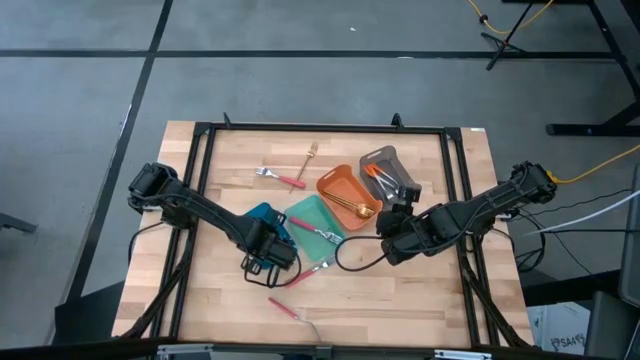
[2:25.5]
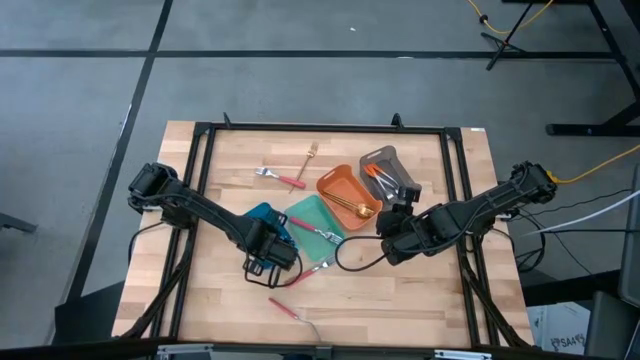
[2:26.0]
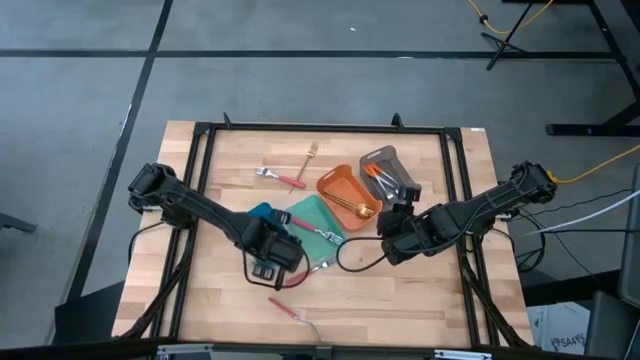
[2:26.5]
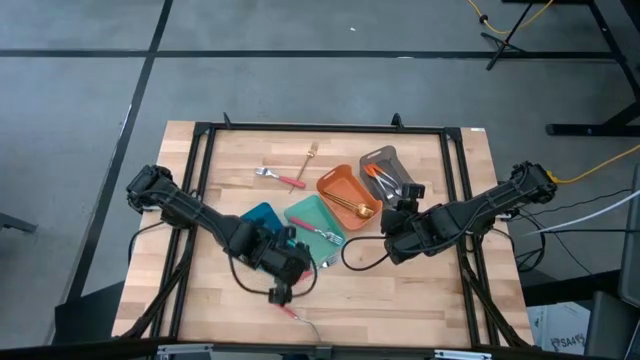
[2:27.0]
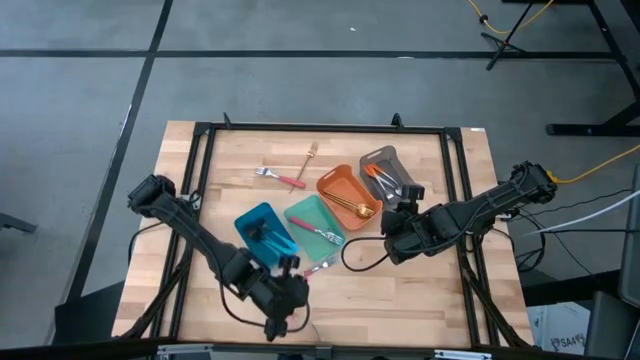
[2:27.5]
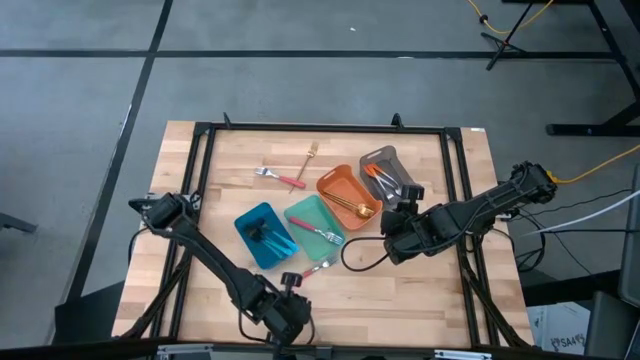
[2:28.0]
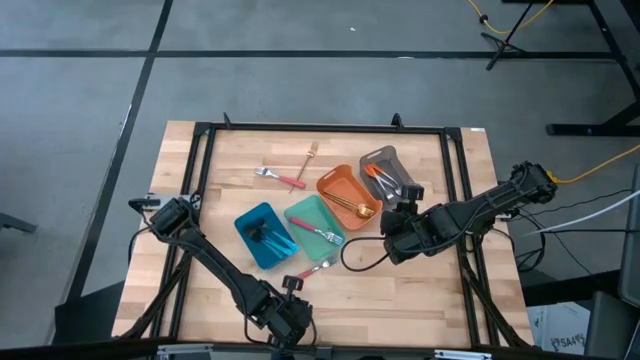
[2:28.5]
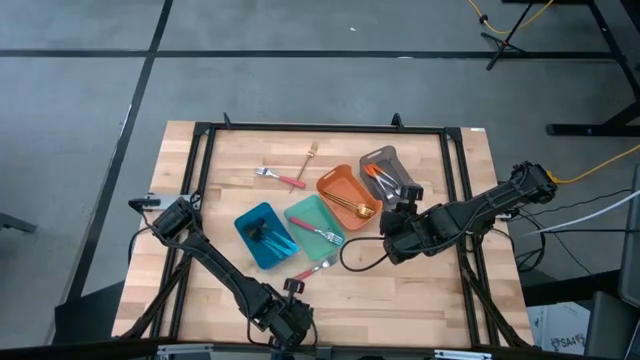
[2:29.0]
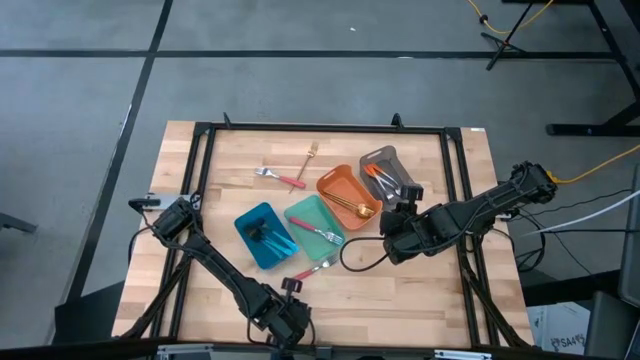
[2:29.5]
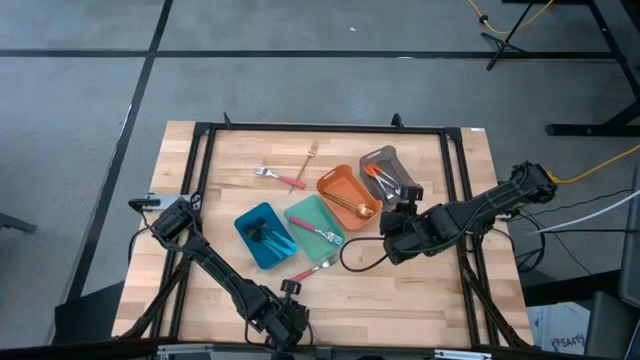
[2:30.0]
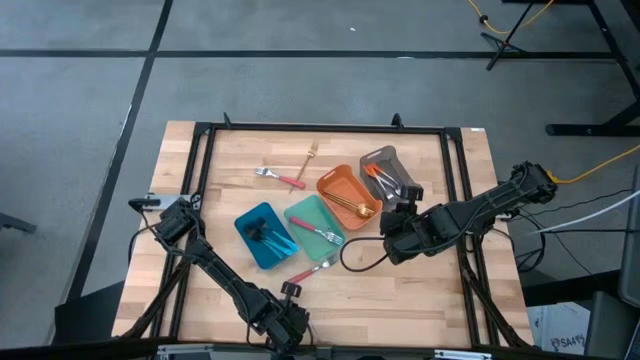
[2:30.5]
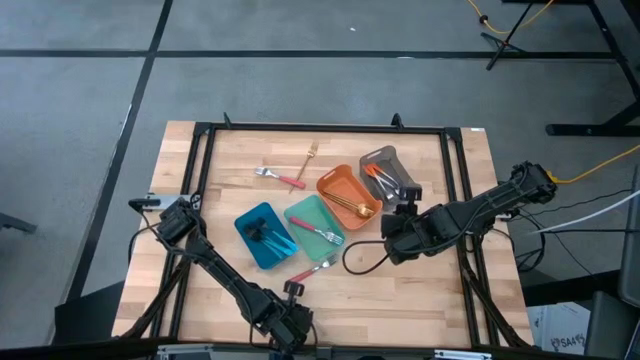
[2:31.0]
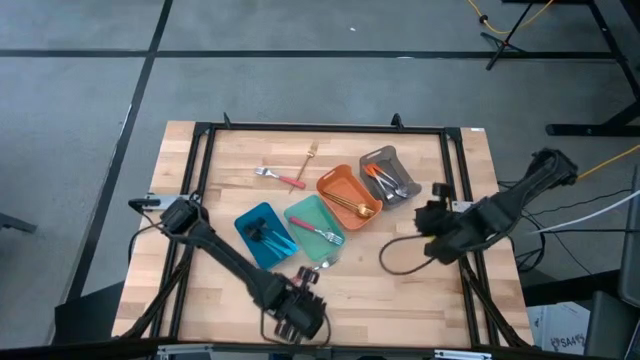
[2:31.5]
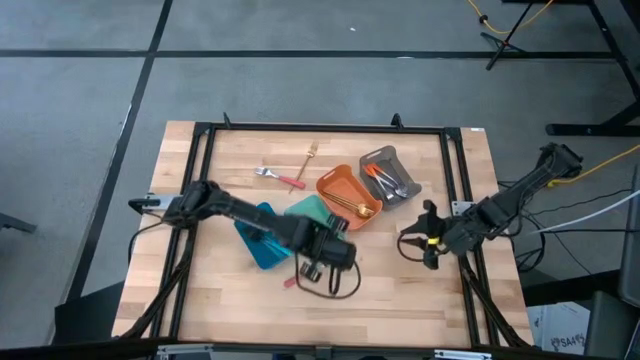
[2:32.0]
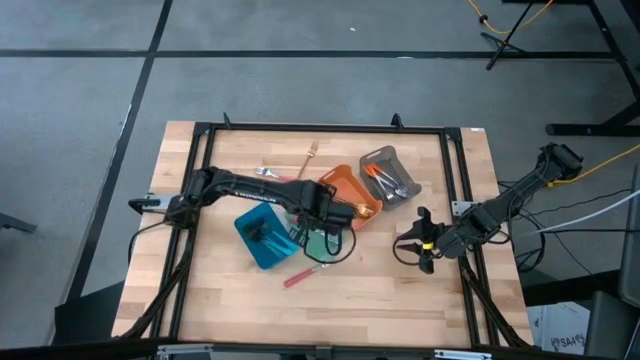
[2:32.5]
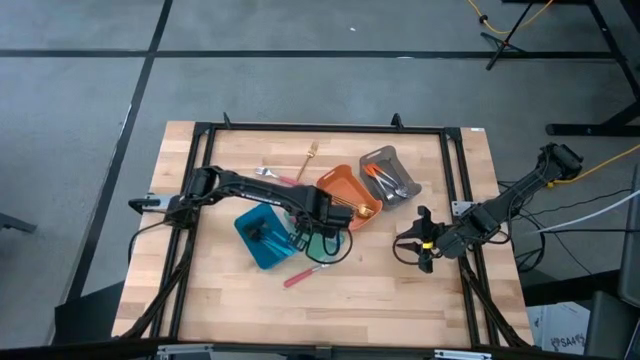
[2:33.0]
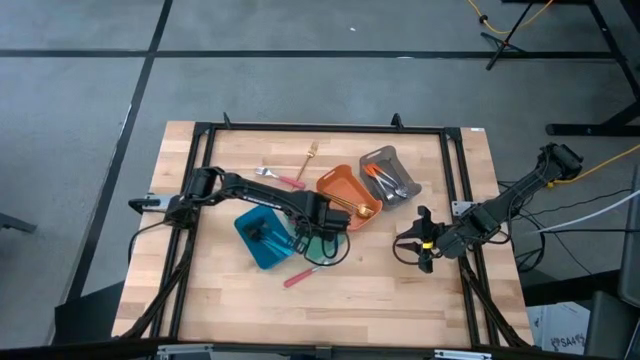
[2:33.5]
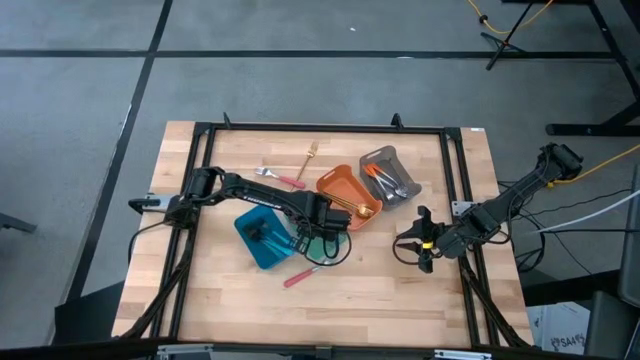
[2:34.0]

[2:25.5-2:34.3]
Task: Sort silverware by color (type)
Put the pink fork into the green bin

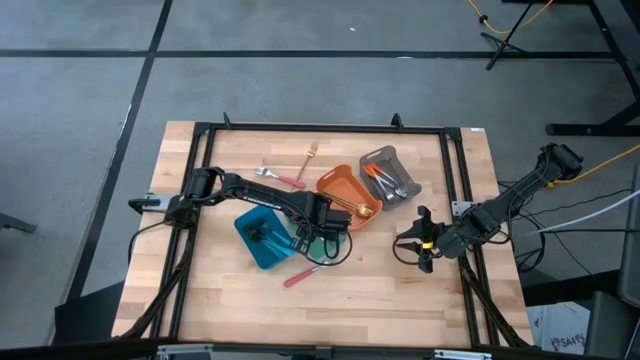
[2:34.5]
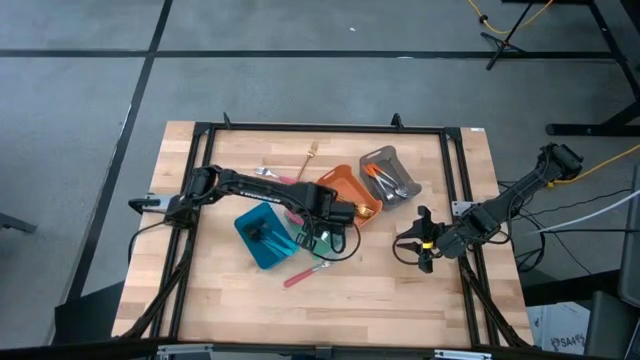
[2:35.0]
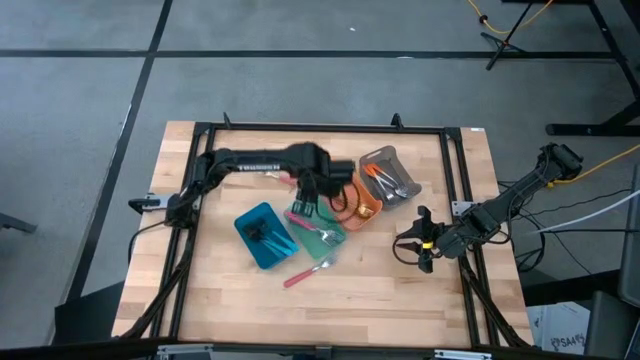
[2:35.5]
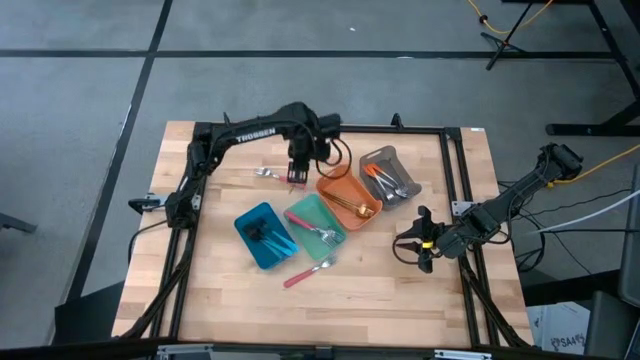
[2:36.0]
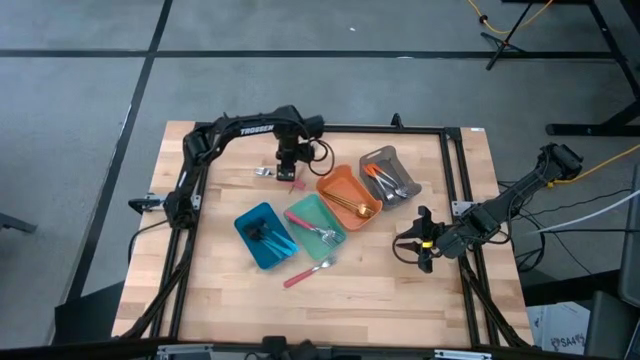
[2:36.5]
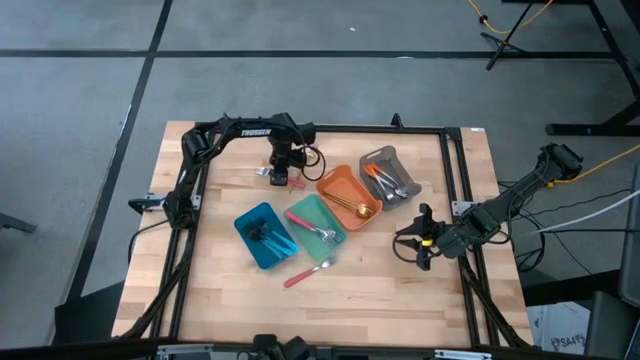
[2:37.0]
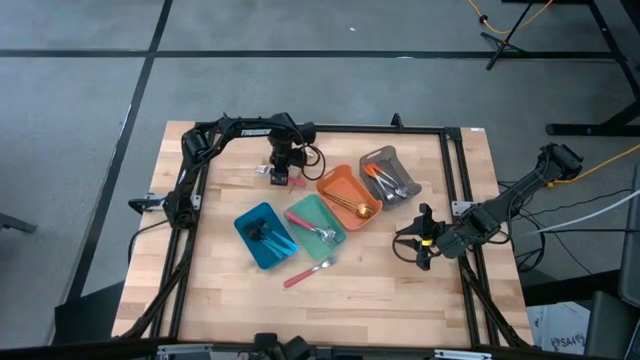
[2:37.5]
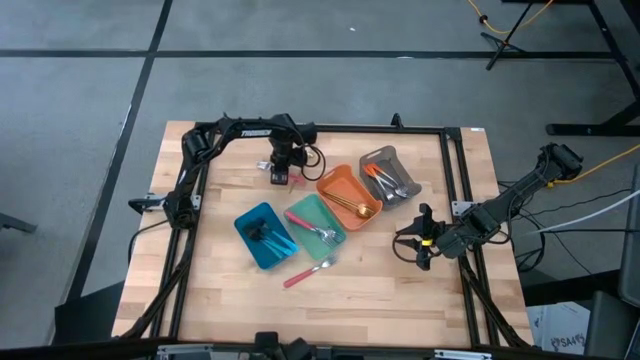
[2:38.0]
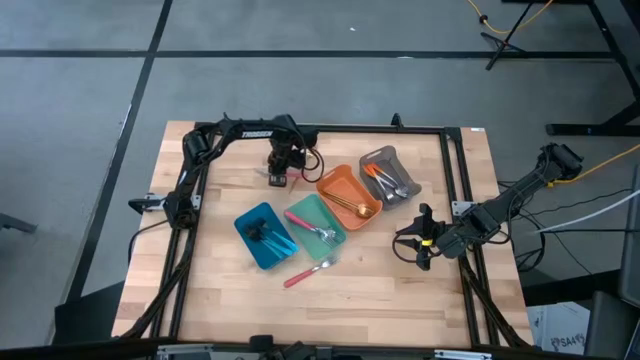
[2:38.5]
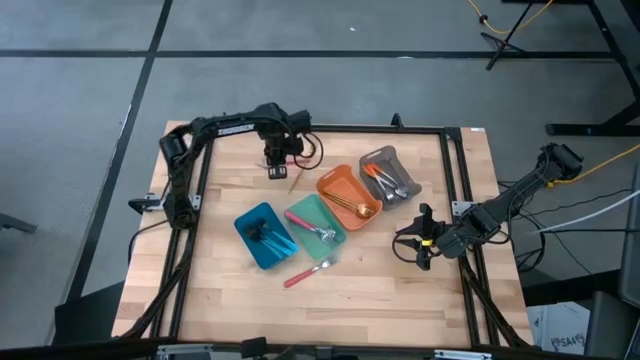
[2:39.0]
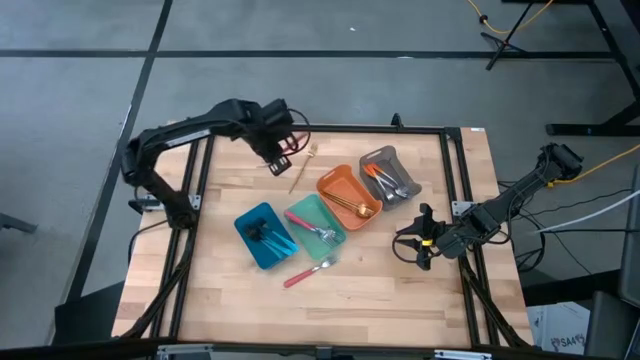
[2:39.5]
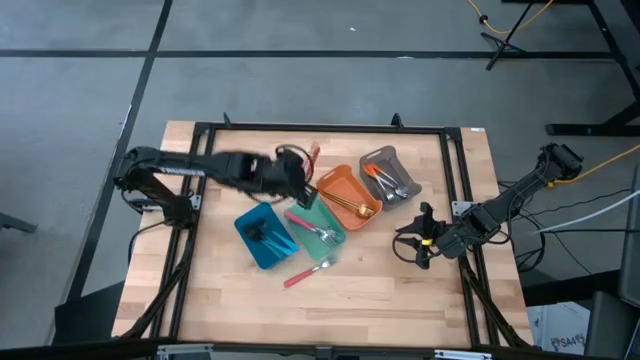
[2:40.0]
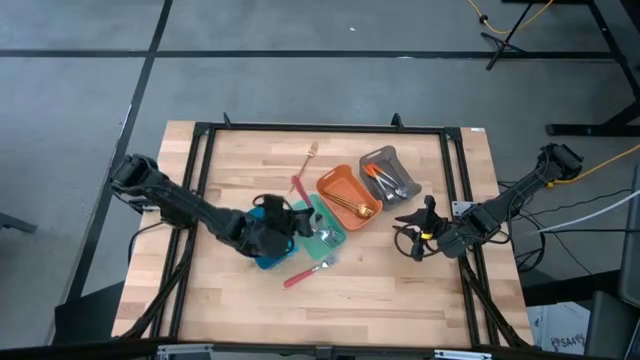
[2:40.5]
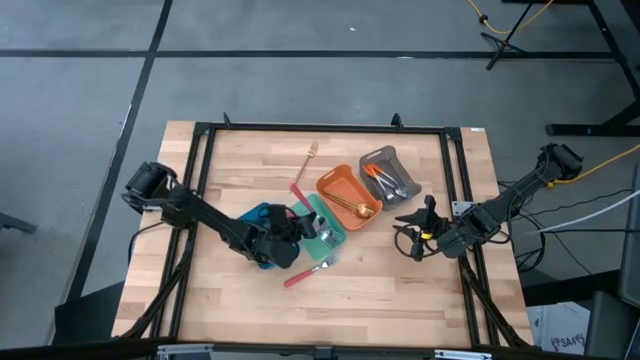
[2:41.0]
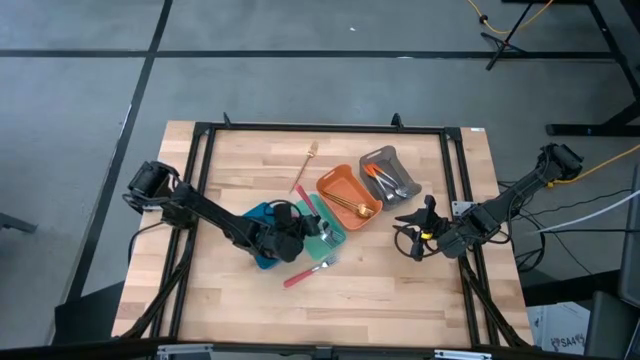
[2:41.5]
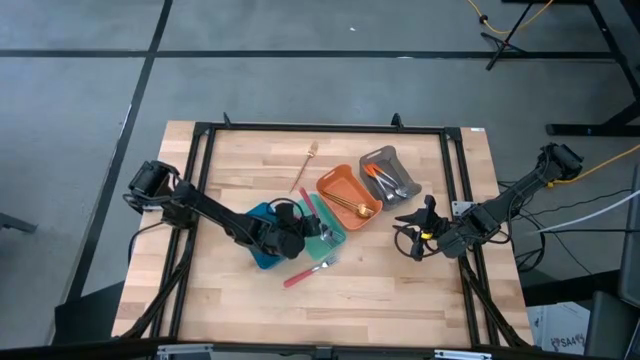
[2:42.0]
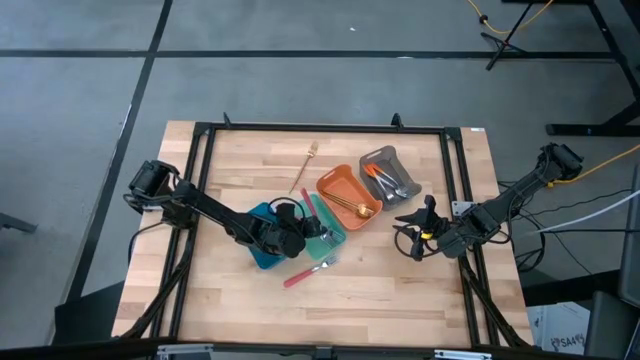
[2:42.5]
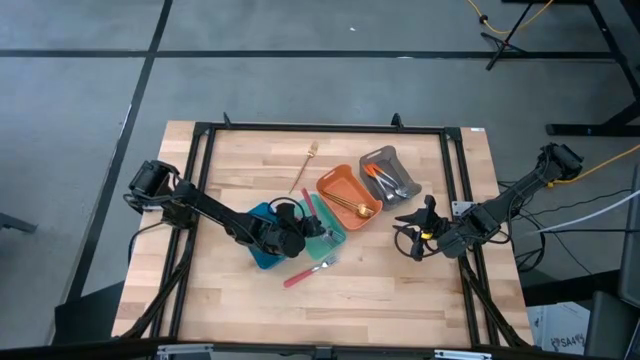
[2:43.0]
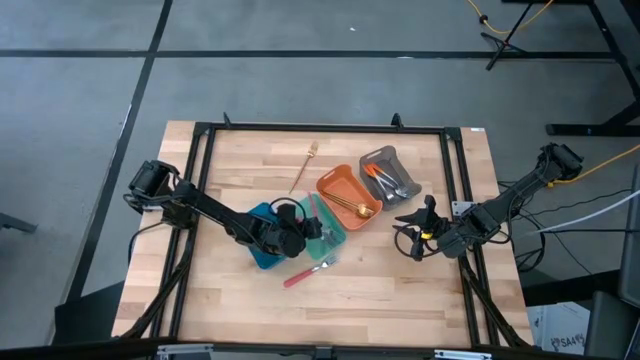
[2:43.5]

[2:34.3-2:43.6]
Put the pink fork into the green bin

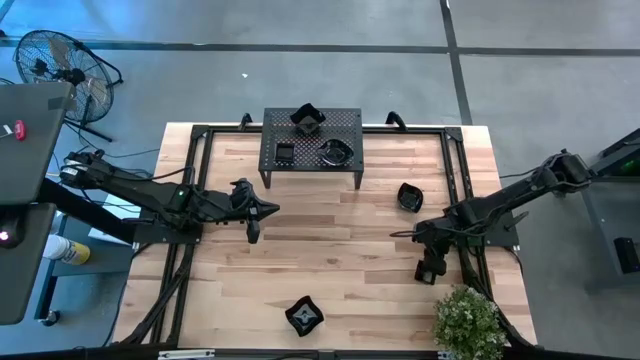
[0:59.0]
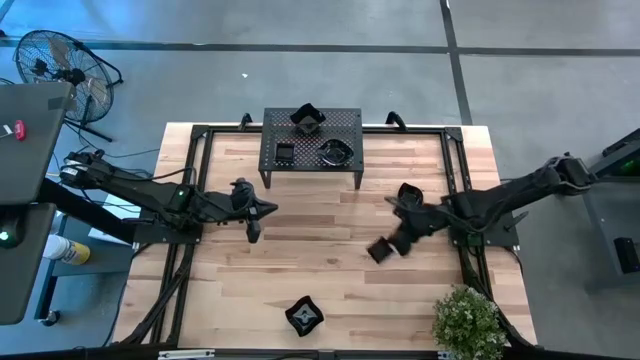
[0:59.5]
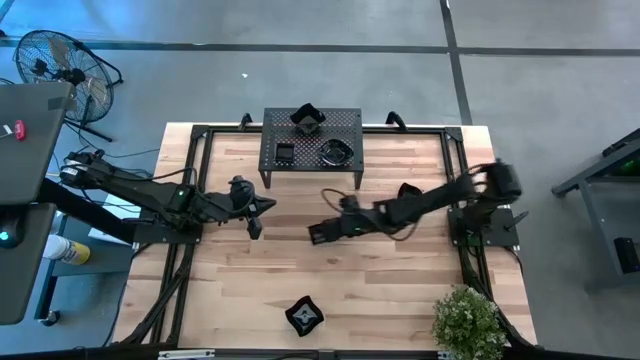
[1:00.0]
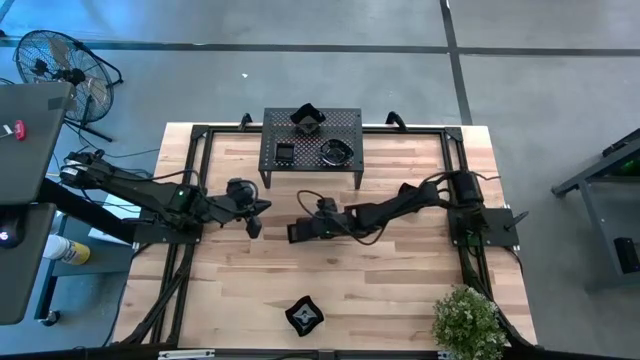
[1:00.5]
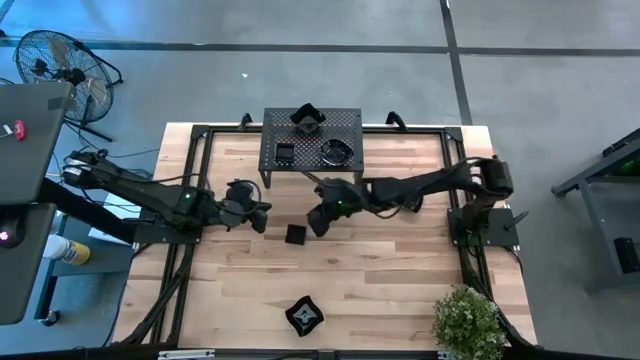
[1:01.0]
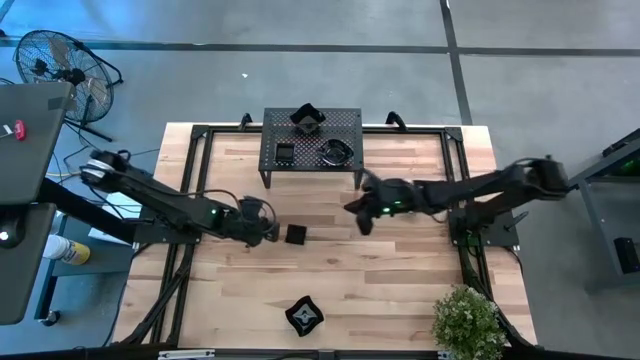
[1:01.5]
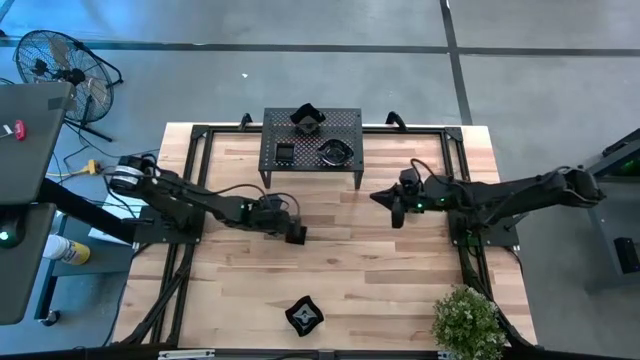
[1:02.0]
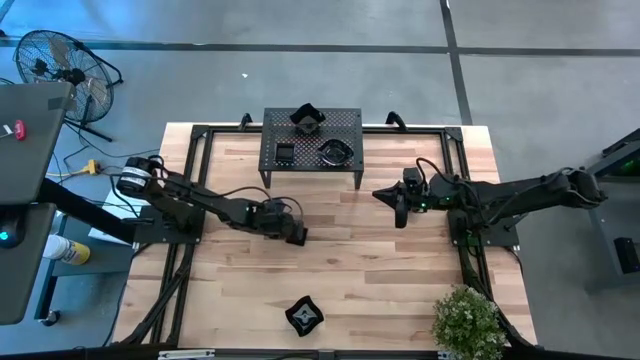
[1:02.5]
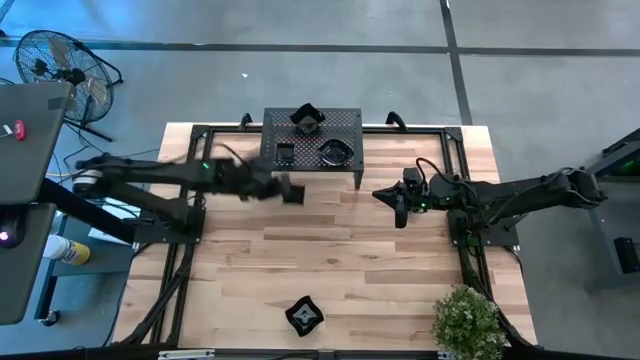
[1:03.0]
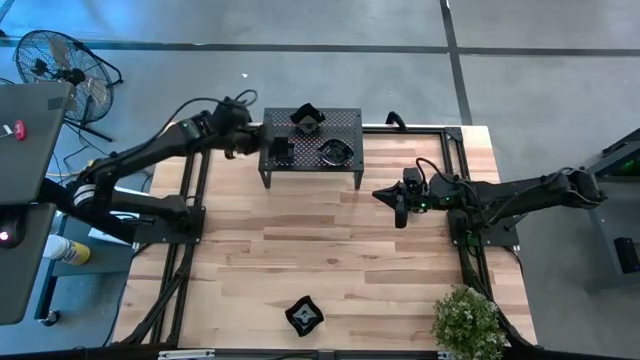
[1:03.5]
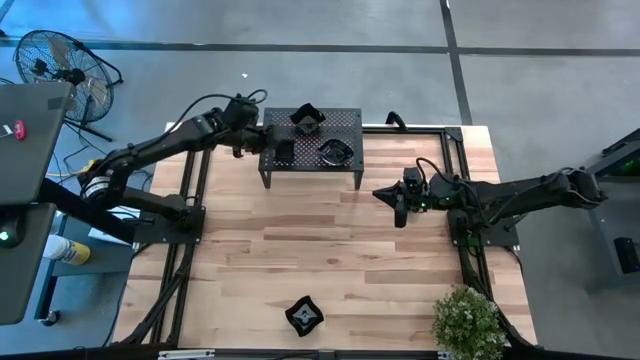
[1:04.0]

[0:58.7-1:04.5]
Task: Pick & Place Mini shaped plates
Stack the black square plate on top of the black square plate on the shelf
